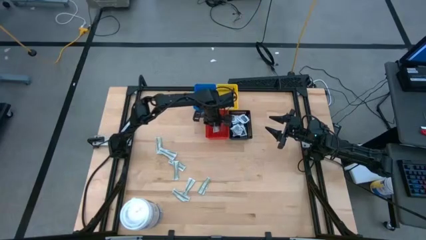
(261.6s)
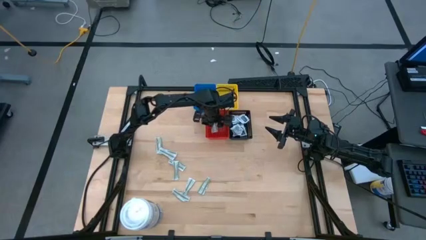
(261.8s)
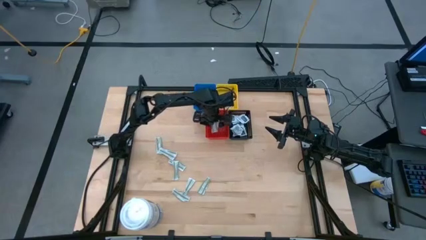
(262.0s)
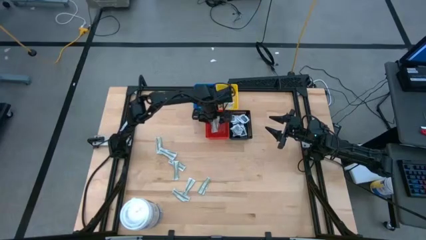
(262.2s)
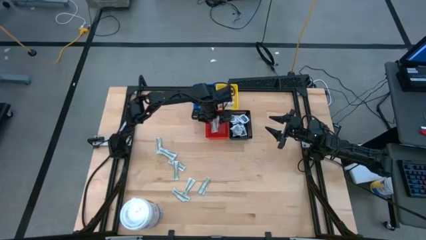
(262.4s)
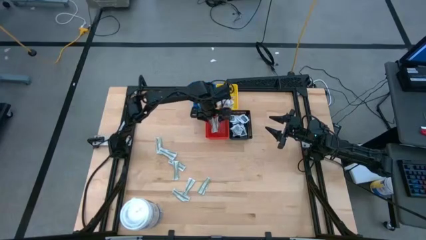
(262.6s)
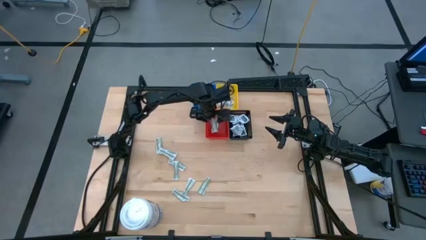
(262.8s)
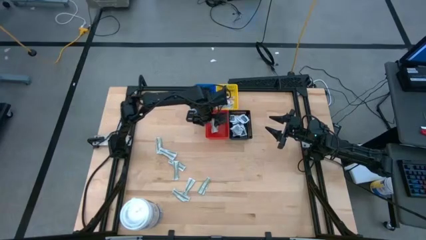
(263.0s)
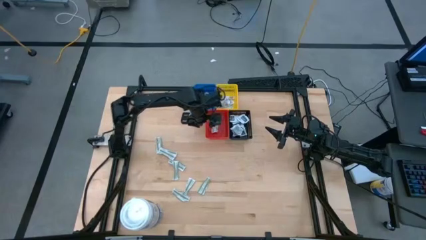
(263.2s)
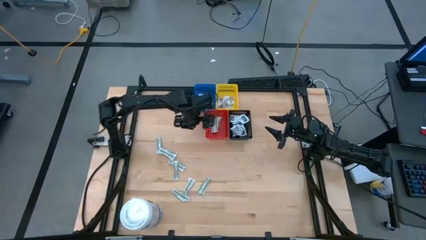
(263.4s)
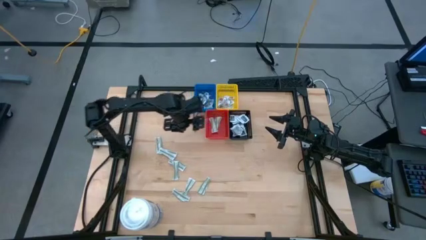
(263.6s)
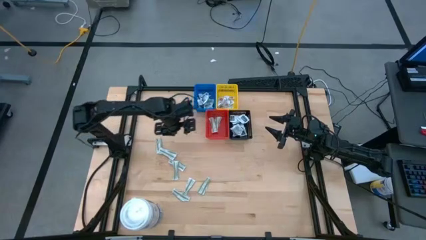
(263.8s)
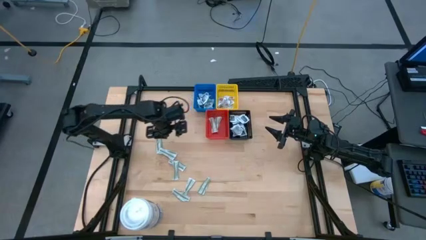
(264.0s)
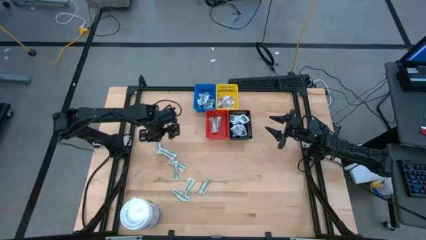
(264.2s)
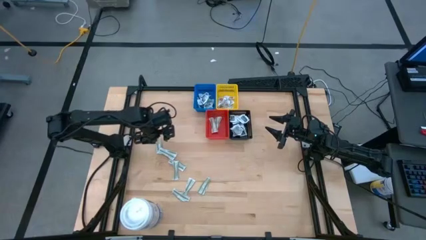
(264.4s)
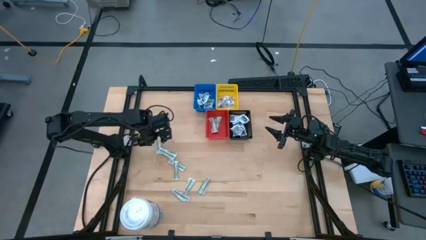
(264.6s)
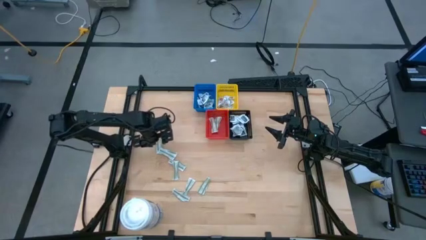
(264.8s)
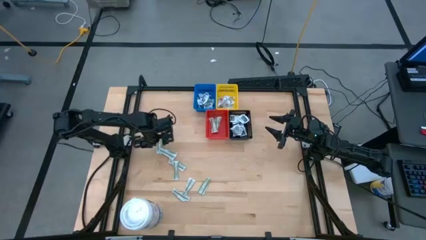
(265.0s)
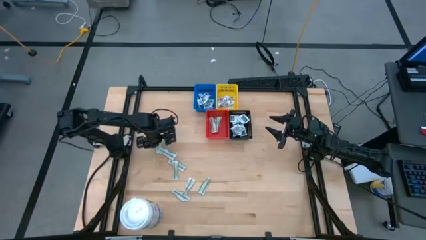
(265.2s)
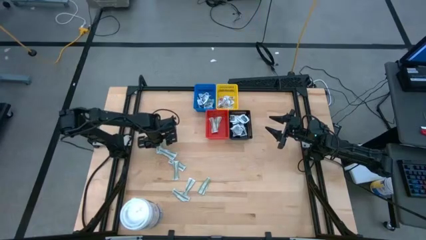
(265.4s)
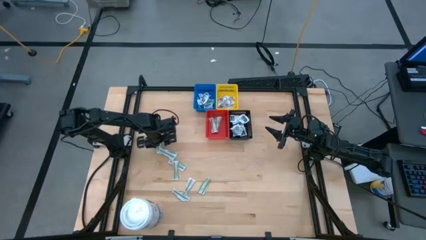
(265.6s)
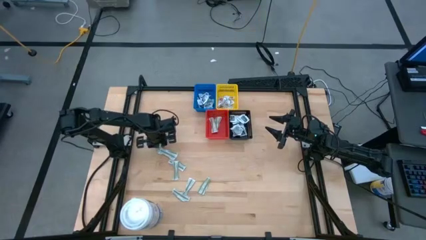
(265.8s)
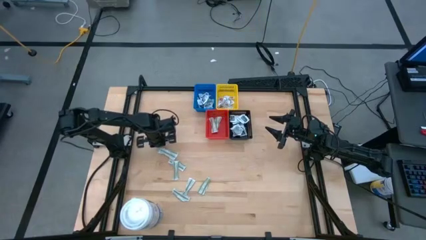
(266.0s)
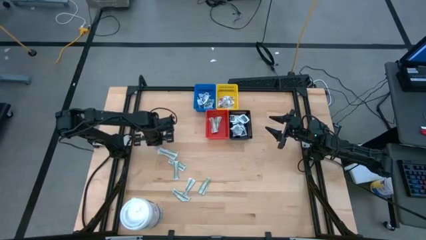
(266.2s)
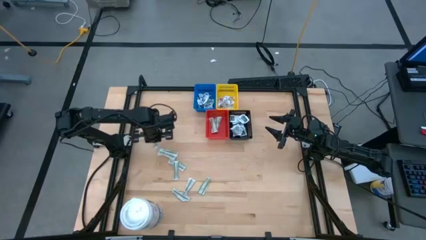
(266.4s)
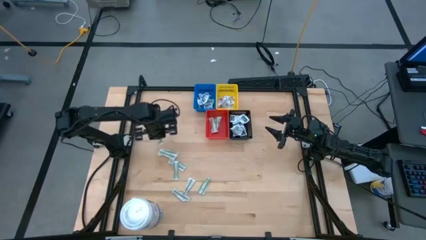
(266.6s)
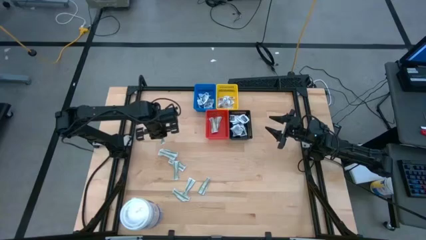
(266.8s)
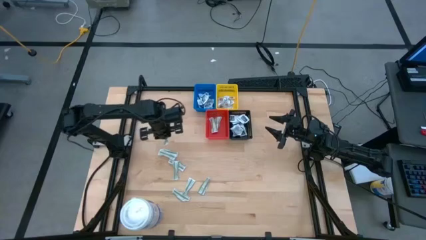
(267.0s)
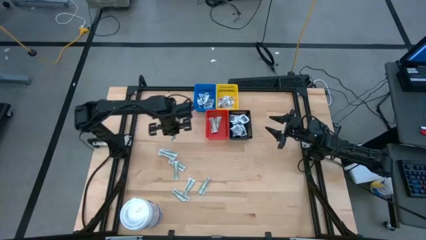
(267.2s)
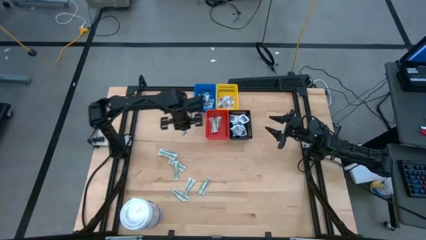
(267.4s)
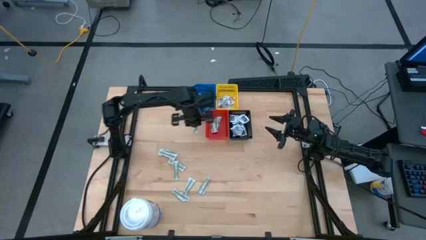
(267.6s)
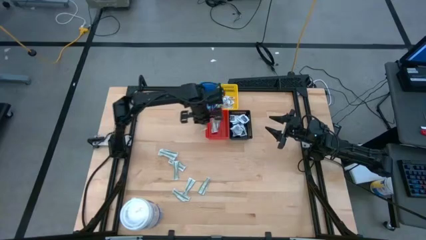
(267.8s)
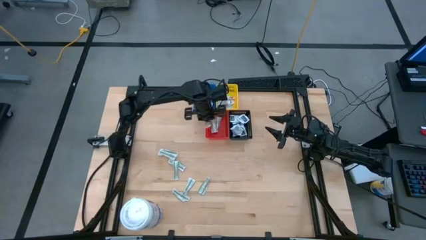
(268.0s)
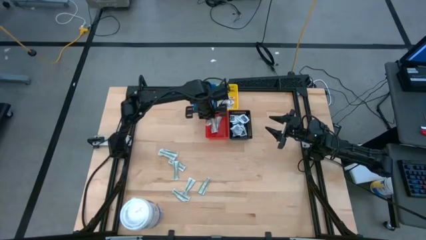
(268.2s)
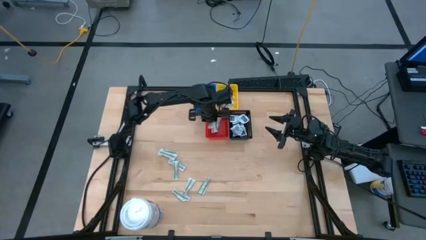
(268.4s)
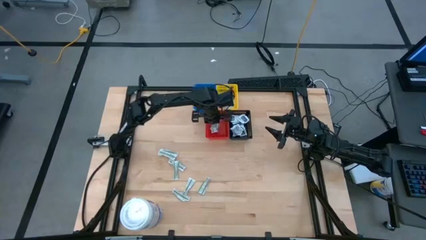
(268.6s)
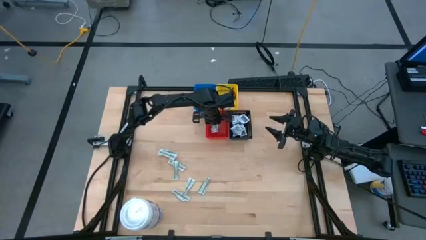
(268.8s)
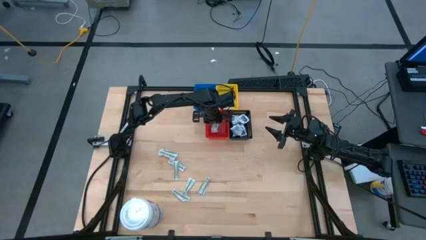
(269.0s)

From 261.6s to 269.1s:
Task: Pick & Place First Aid Supplies
Put the bandage pack into the red bin

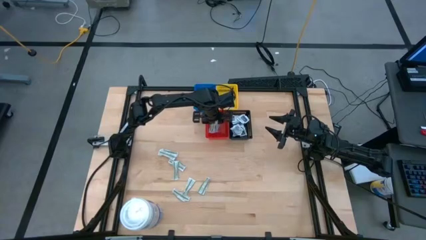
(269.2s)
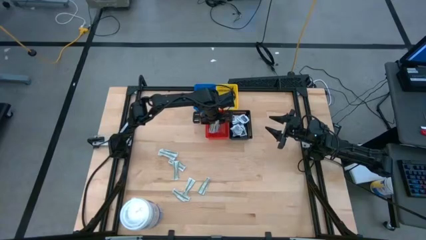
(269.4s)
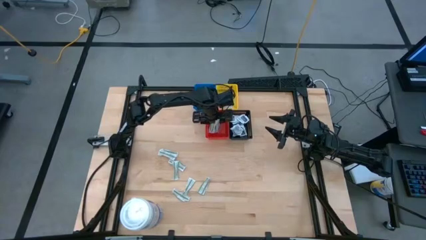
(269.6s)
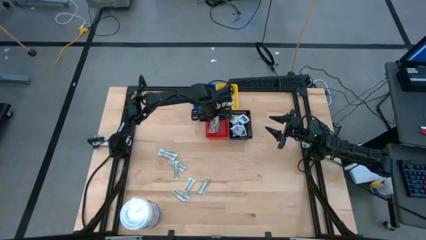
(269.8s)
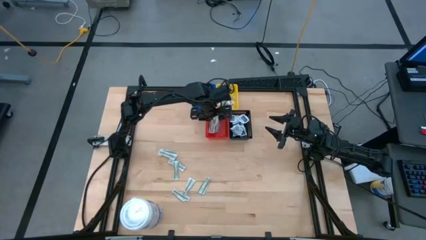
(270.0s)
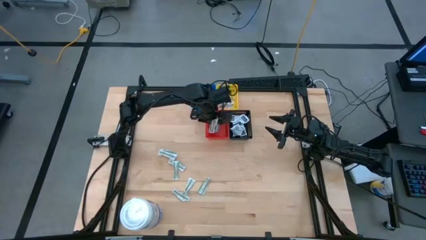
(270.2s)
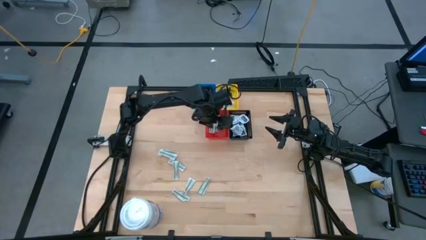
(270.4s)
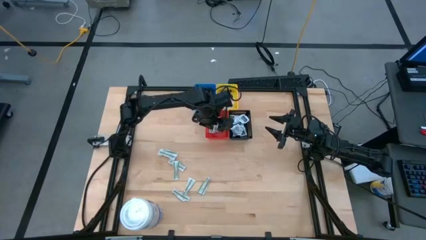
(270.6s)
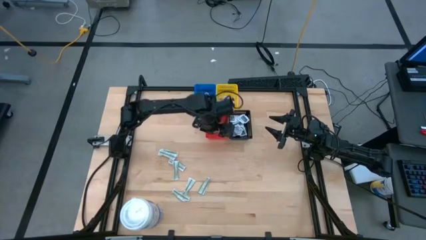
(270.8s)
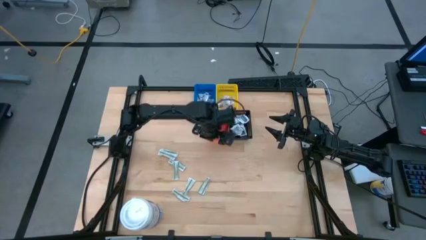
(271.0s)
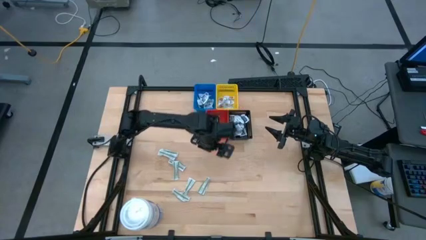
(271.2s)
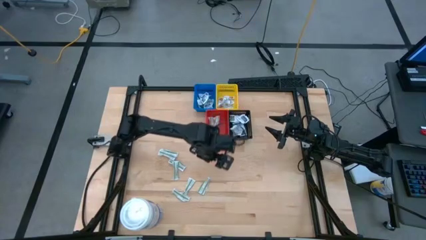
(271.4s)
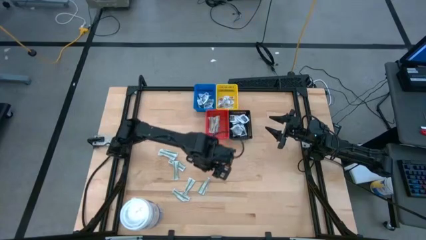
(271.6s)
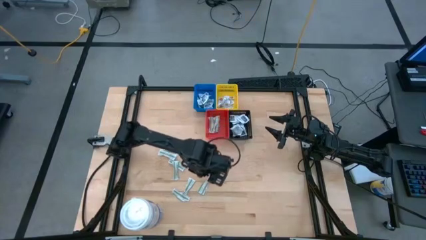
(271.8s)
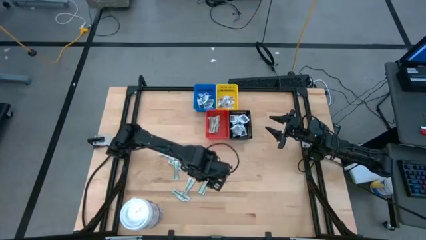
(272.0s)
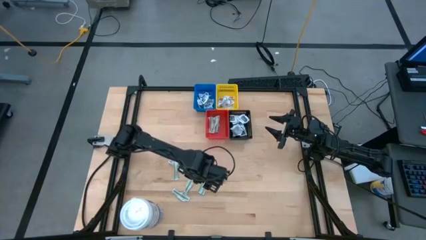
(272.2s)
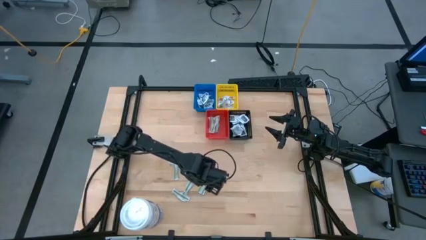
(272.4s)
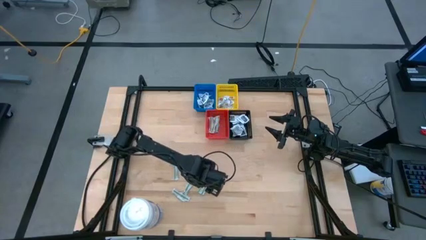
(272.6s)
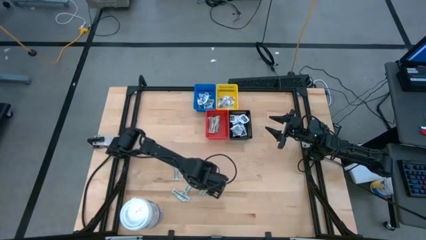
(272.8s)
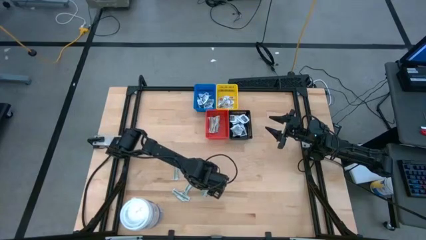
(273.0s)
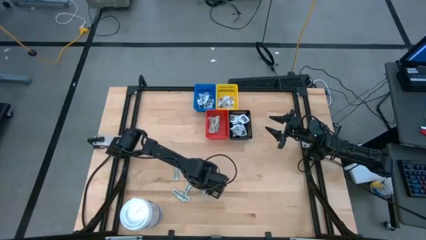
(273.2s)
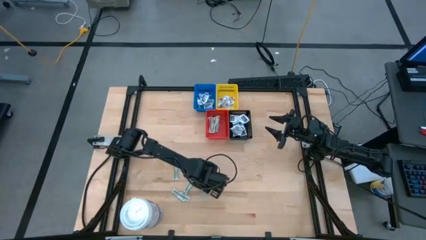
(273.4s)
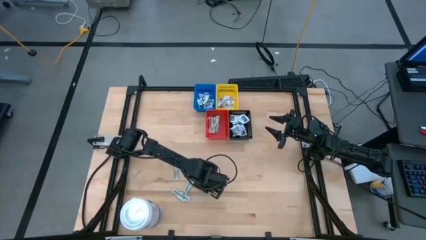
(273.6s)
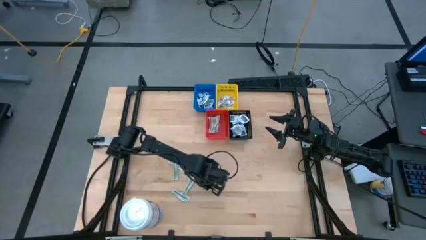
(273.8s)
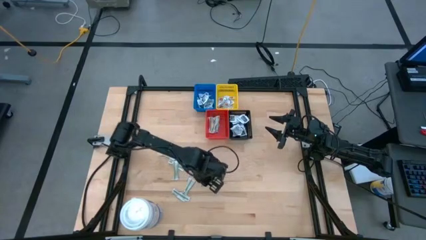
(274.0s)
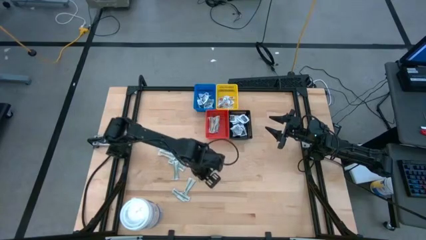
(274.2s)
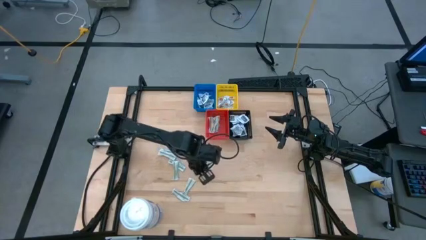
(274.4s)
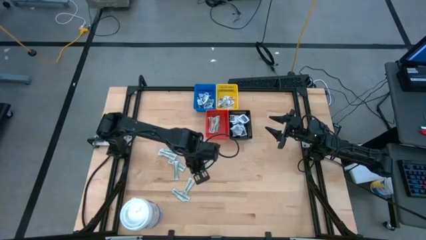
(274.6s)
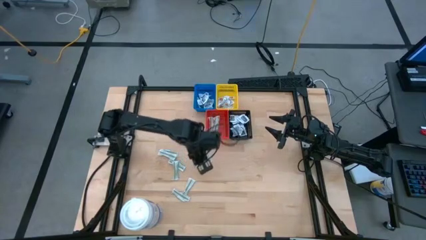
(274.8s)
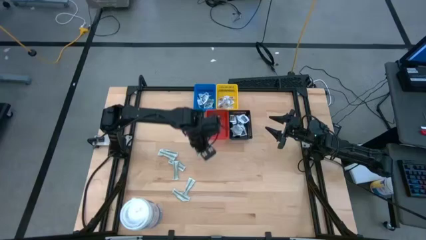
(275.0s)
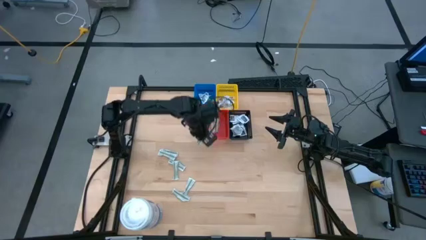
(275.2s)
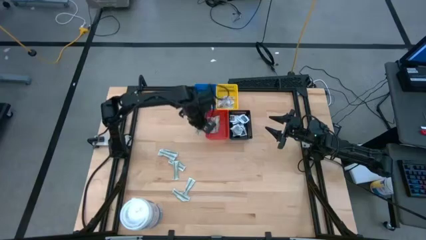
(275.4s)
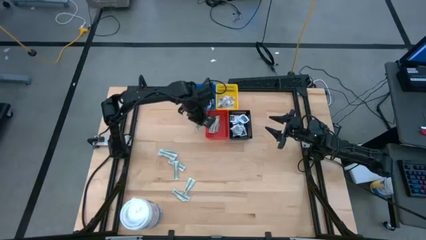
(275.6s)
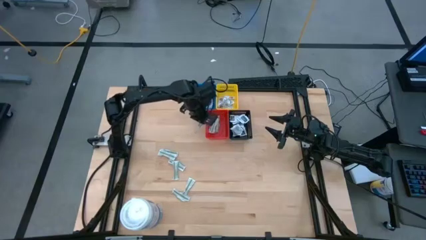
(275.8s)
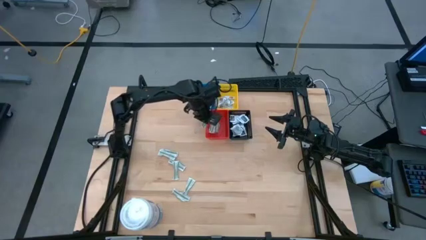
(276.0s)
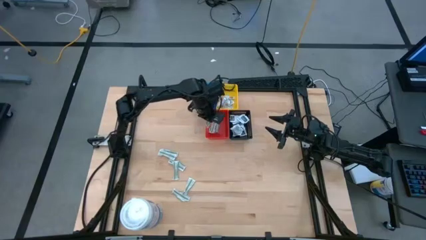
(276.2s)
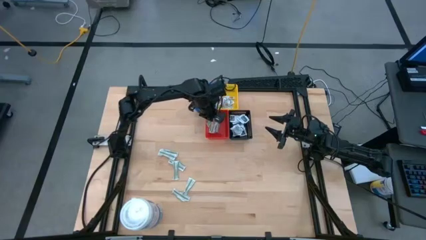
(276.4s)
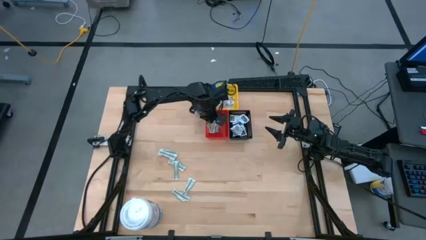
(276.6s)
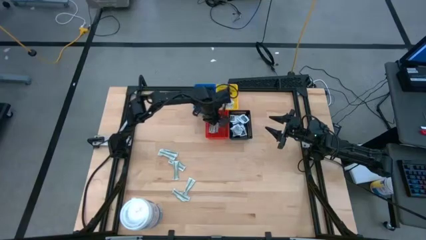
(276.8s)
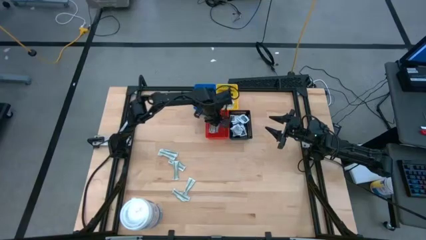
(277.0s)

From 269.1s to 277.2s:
Put the bandage pack into the red bin
